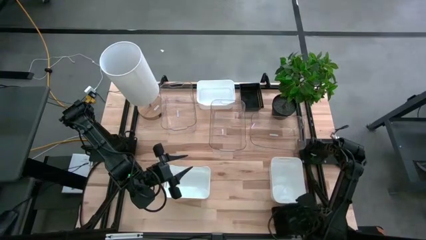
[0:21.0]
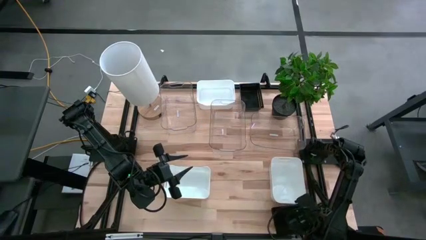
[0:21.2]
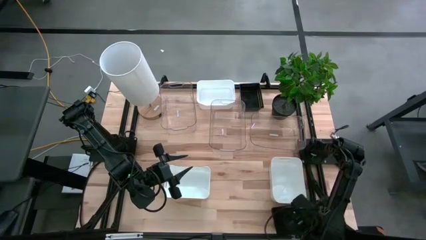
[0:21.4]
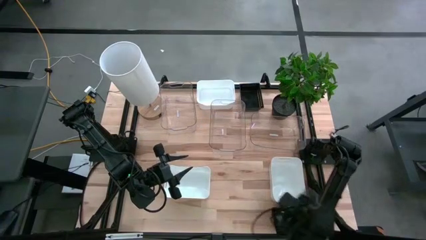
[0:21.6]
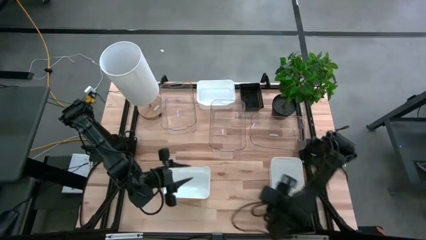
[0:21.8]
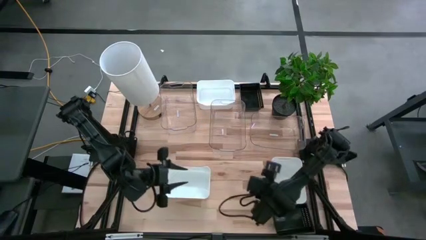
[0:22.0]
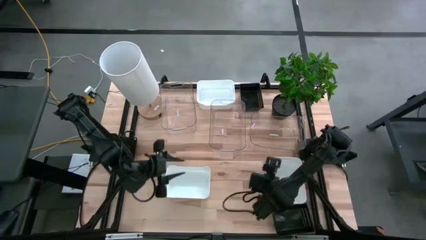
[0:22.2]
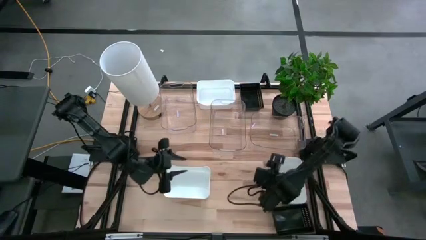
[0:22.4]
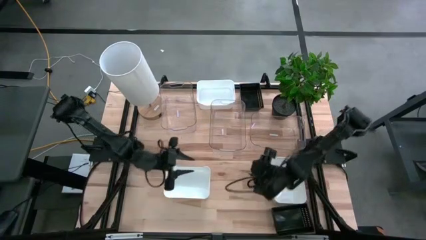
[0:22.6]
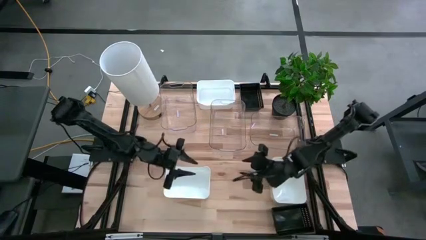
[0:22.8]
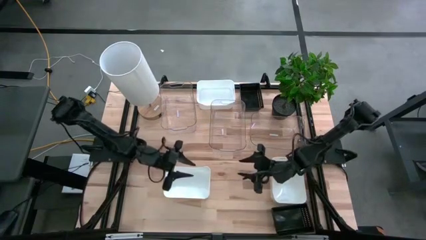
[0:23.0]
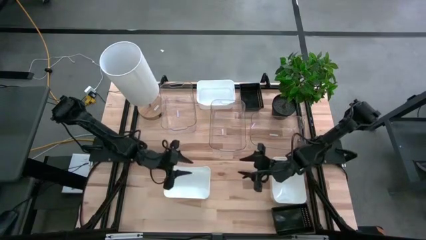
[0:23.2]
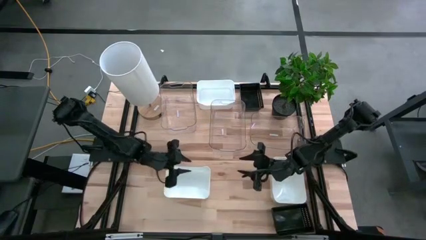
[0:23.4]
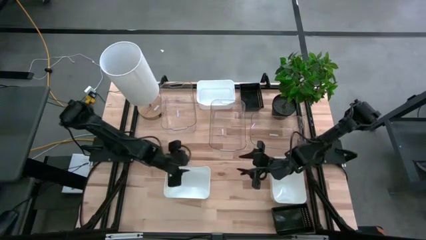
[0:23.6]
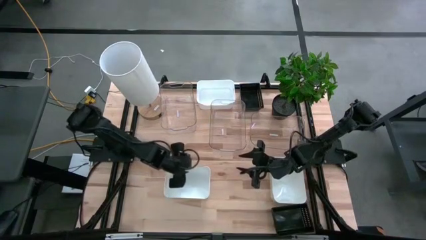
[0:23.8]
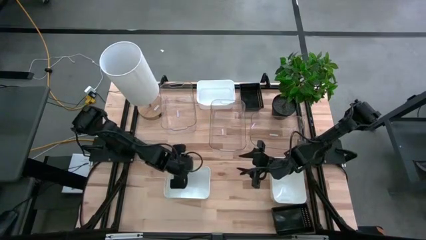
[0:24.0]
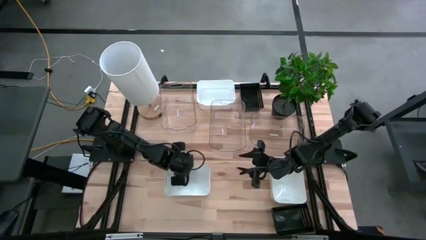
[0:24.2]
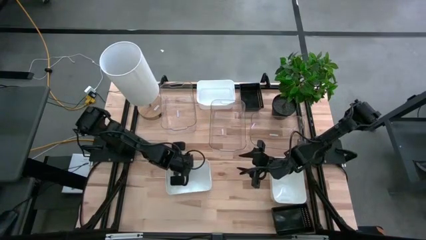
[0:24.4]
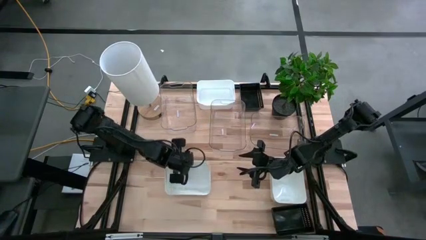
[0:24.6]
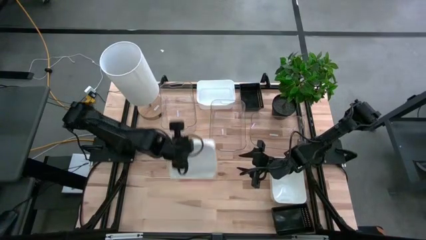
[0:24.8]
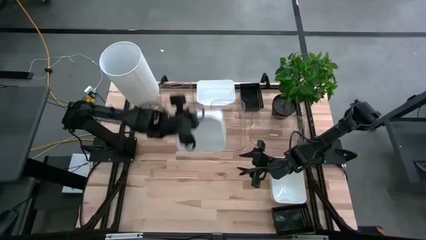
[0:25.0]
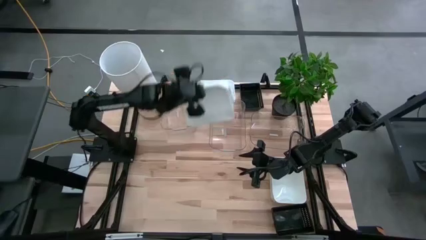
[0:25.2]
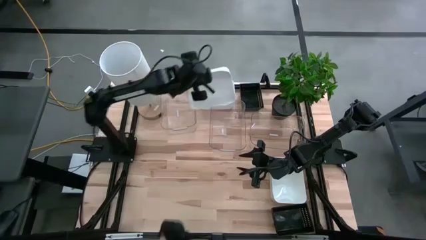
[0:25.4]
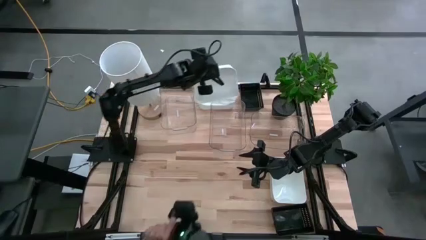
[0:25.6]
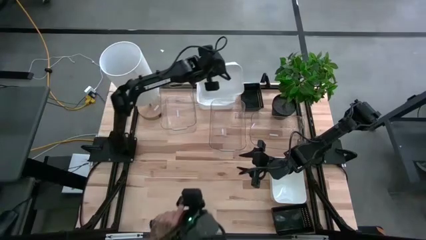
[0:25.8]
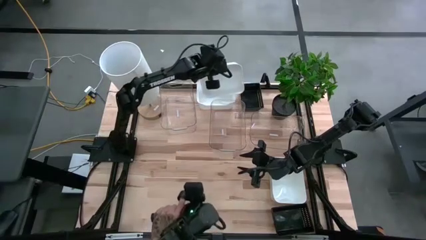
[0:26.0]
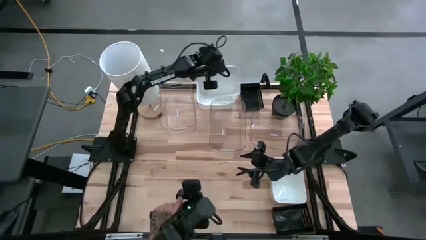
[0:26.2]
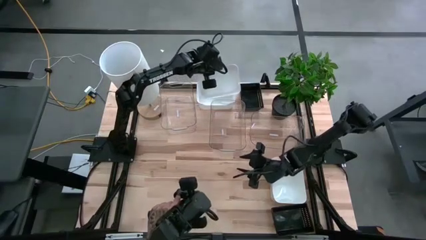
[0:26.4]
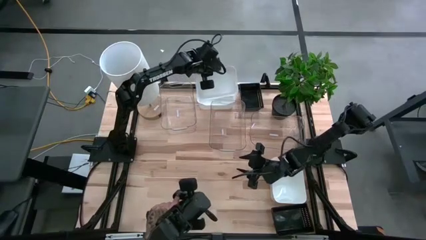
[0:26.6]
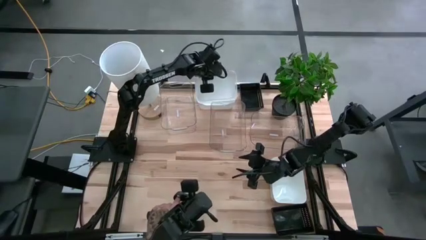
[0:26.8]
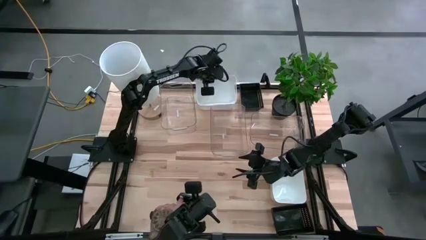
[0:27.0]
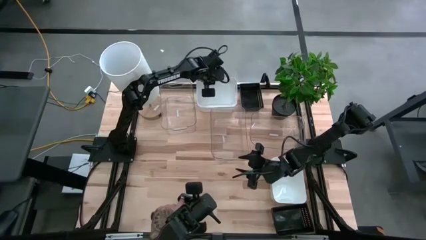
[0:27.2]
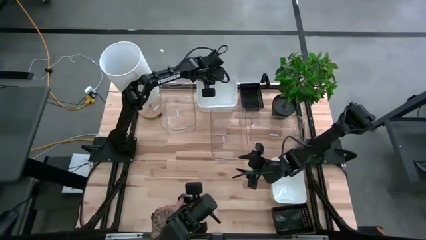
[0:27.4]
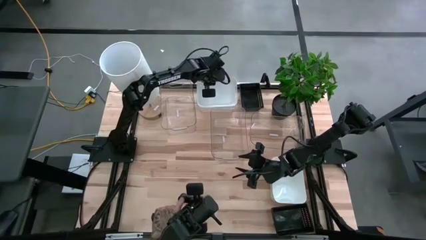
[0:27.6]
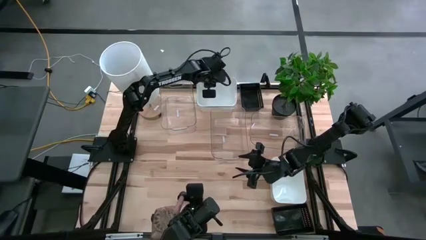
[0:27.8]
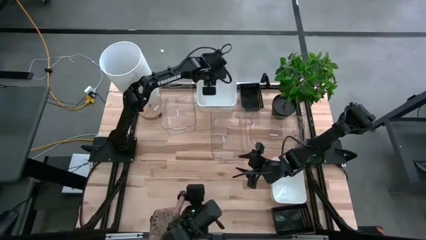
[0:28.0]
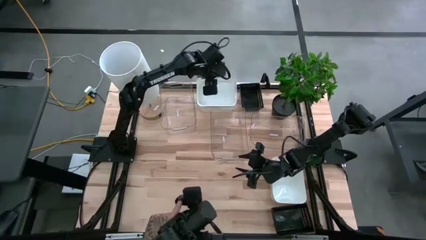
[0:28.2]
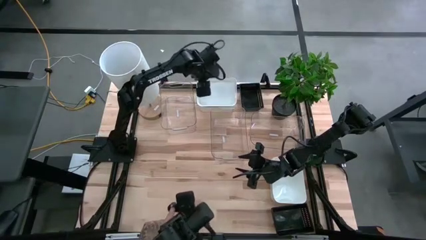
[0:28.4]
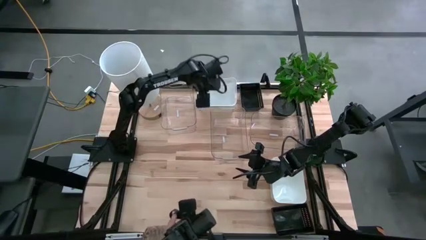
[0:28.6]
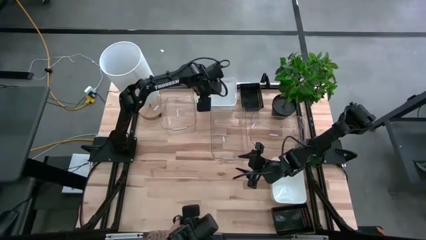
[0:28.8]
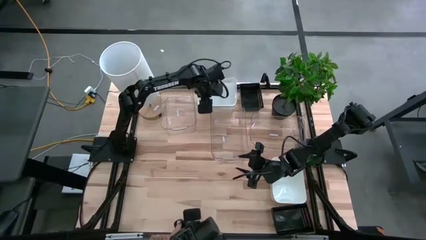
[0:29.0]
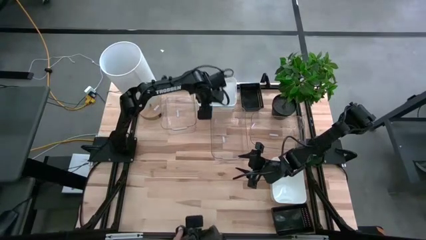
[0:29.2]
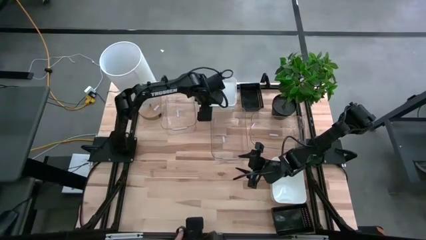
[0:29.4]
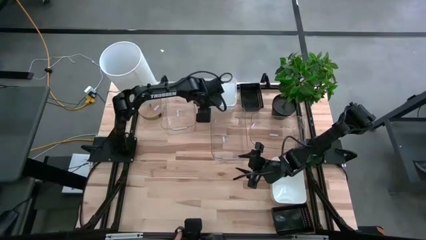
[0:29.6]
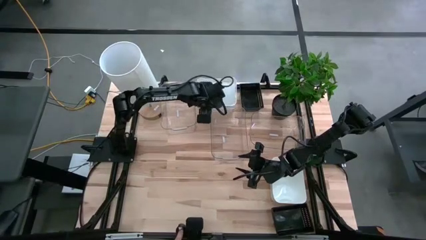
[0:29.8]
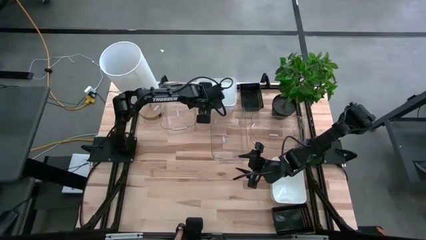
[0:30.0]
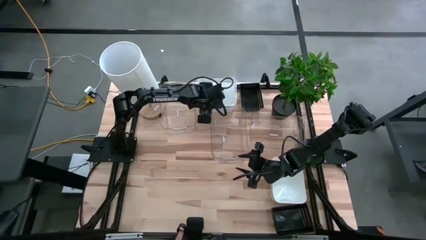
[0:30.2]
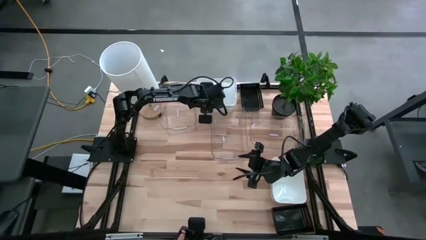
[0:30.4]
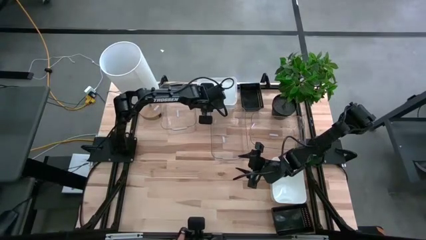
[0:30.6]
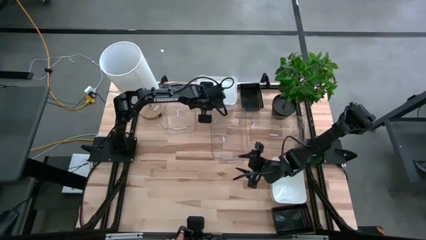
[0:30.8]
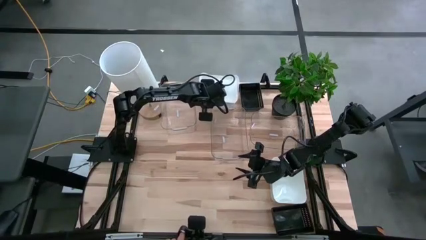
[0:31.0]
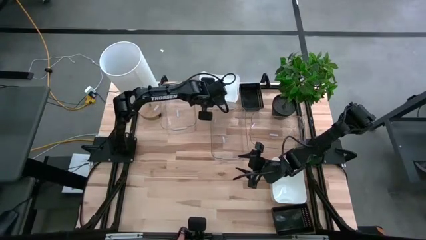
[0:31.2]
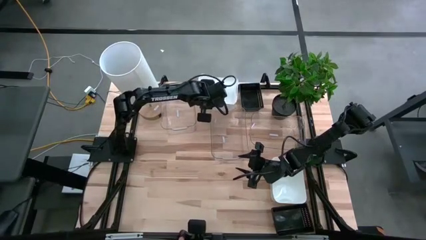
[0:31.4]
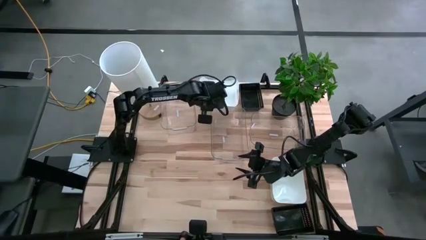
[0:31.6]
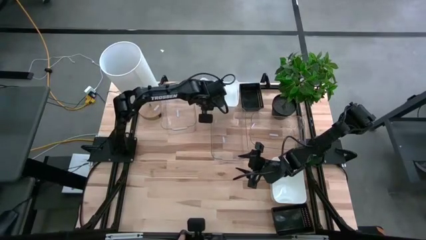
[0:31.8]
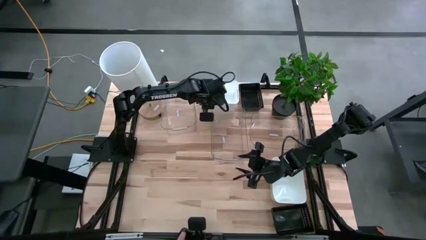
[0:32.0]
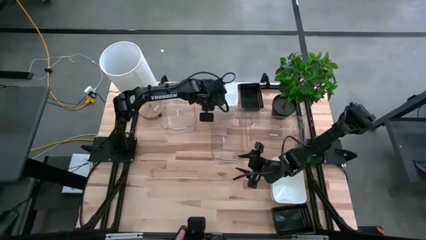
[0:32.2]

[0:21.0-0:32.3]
Stack the bottom left white bin on top of the top white bin

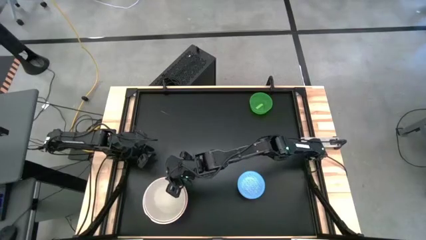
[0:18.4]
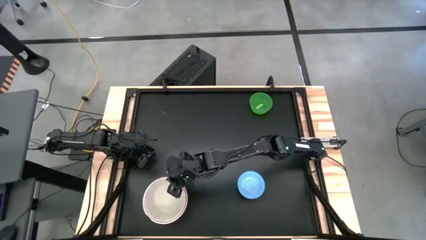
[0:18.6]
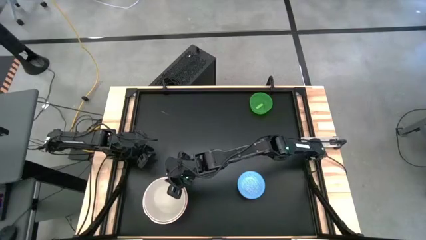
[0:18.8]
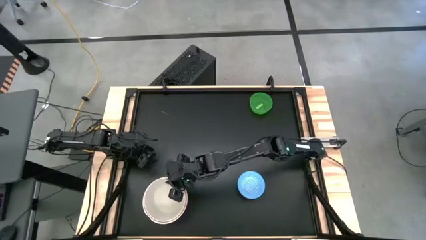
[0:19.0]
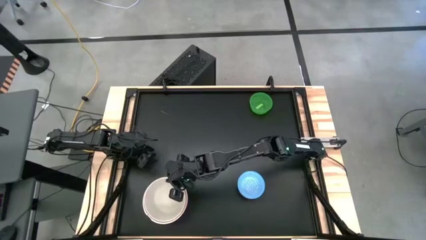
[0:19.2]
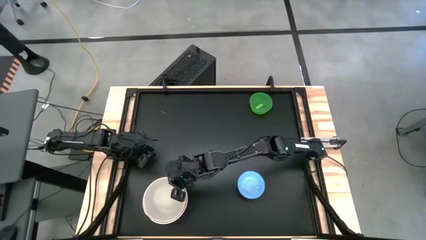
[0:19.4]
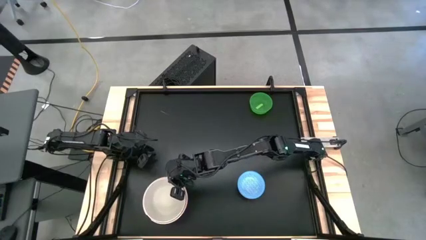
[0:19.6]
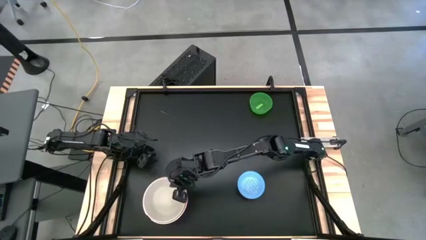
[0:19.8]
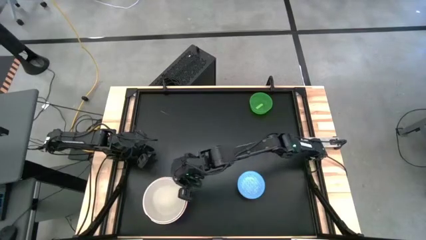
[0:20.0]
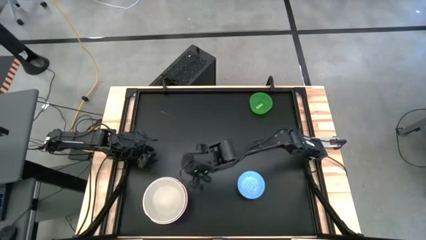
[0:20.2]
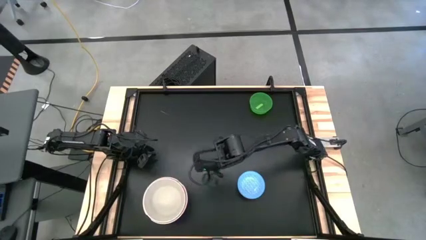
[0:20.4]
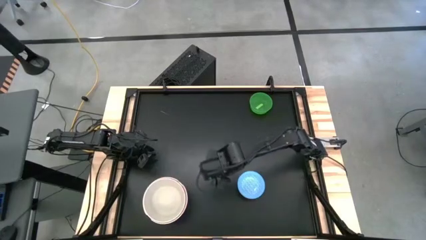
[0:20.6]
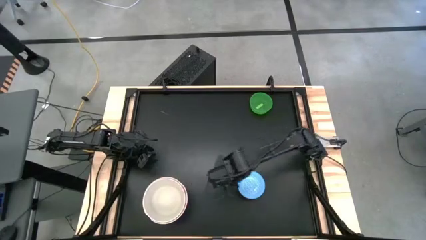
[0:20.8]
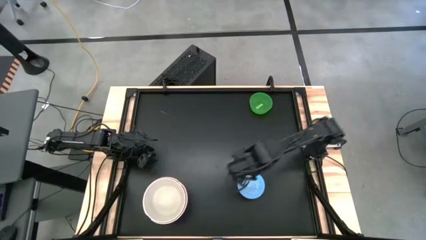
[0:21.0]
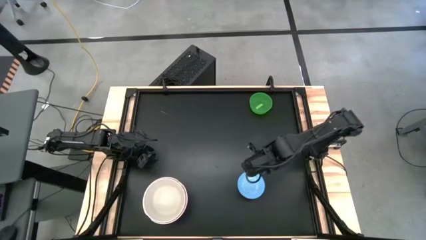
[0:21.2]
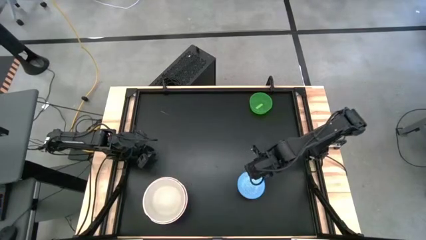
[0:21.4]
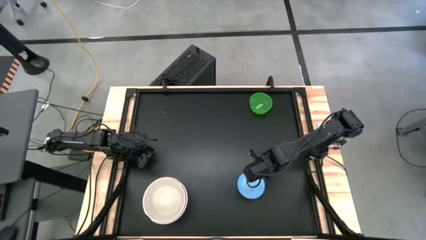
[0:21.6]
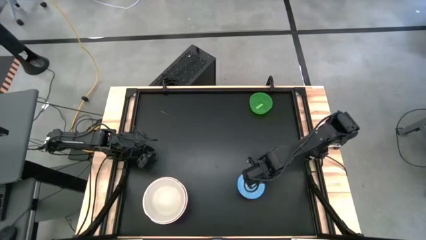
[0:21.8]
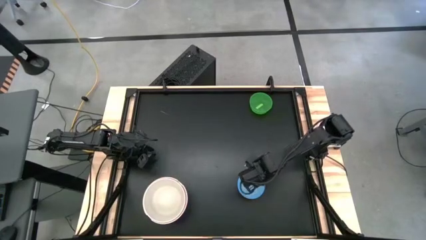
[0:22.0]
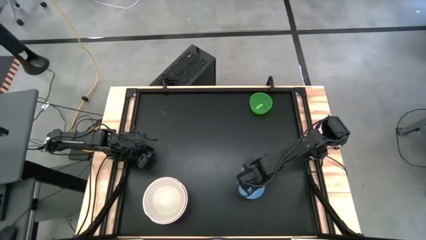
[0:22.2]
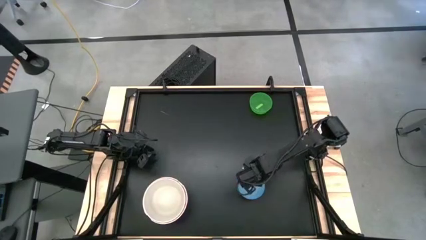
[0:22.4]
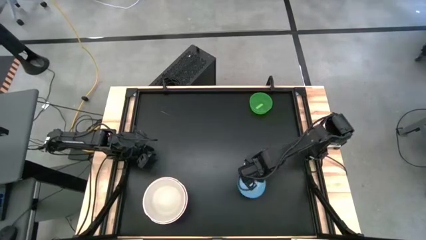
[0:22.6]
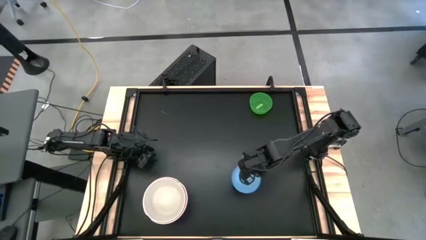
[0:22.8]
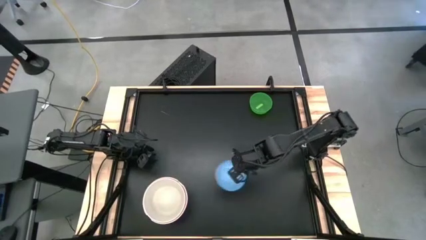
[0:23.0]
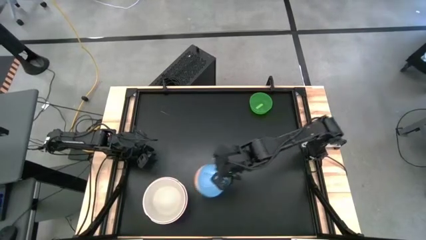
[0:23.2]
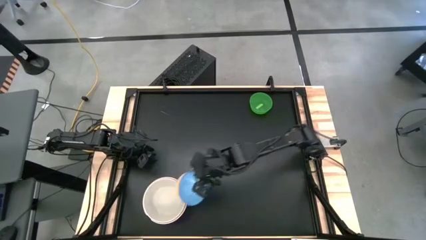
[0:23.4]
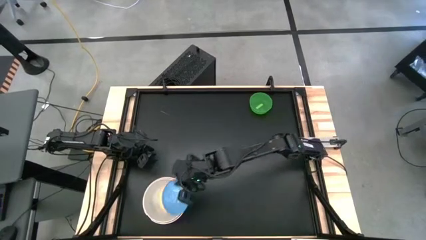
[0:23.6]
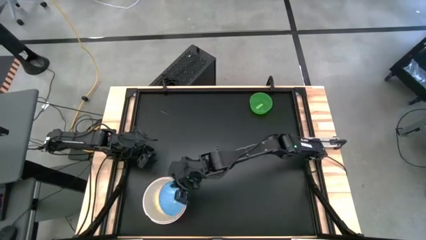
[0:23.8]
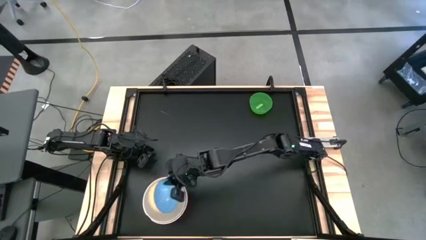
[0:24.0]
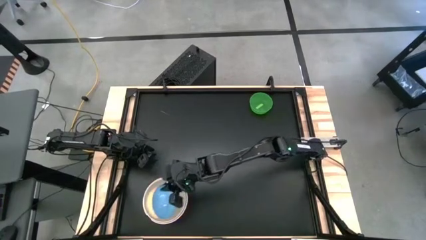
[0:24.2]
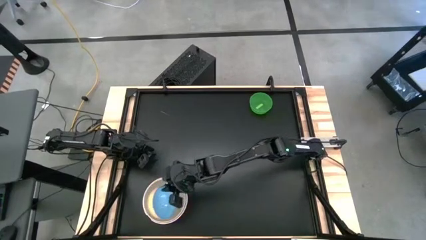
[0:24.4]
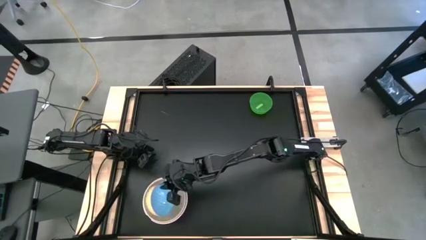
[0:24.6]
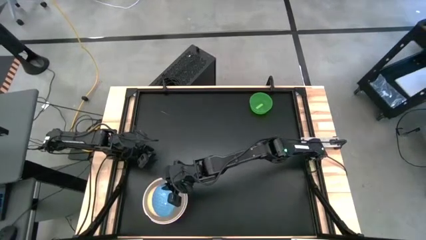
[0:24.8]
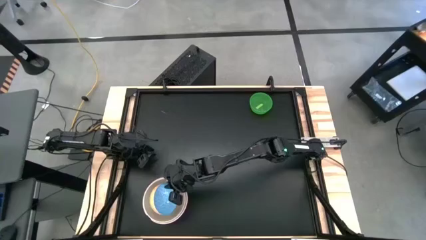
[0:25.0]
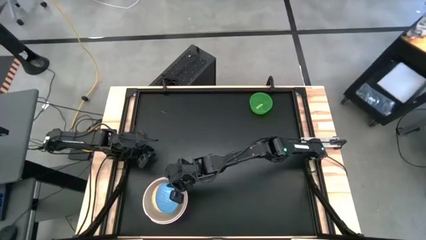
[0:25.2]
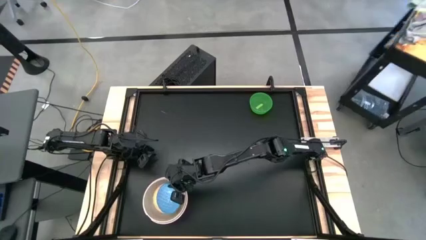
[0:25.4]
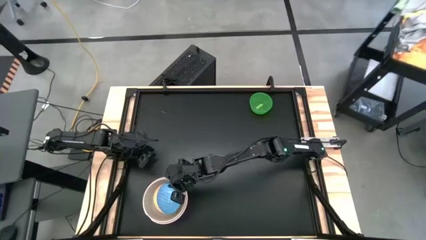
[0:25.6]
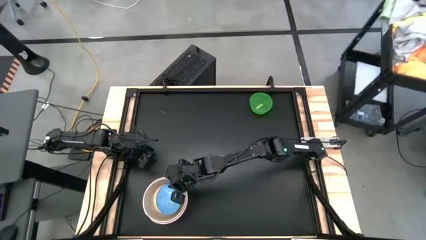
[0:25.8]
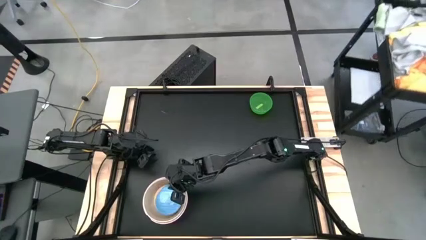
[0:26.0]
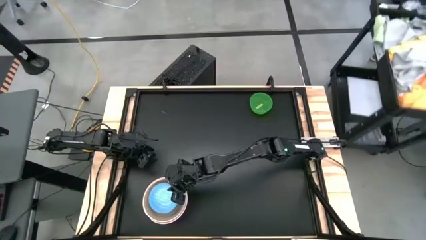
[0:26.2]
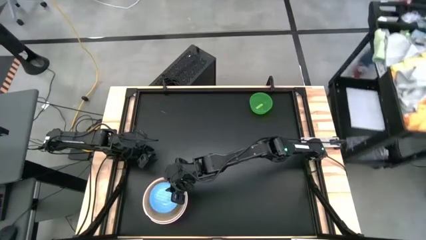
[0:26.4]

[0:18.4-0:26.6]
Stack the blue pattern bowl on top of the other white bowl
